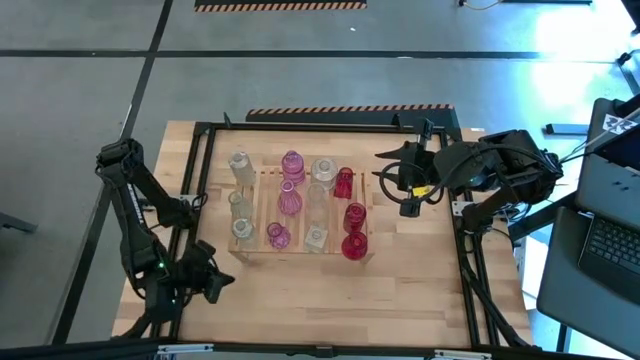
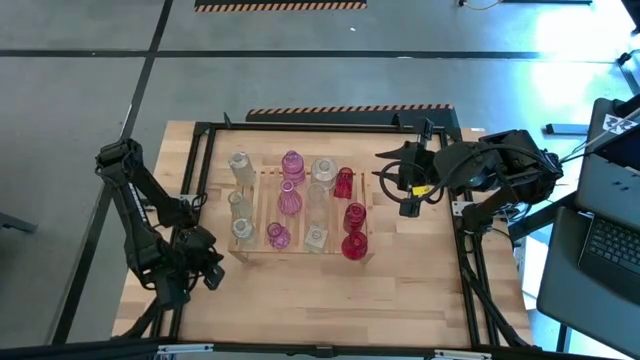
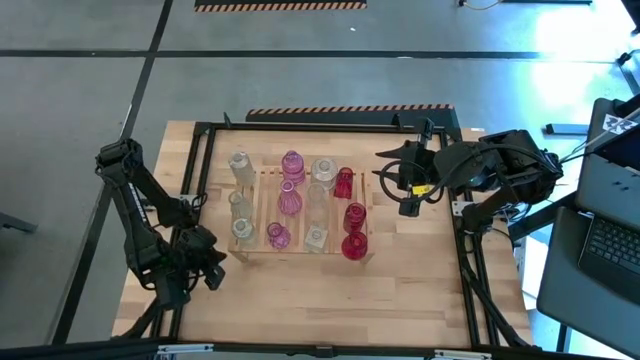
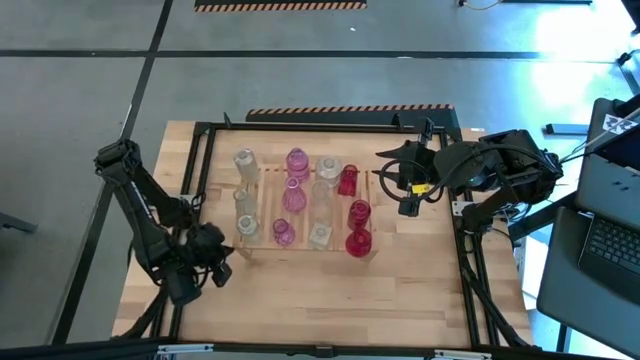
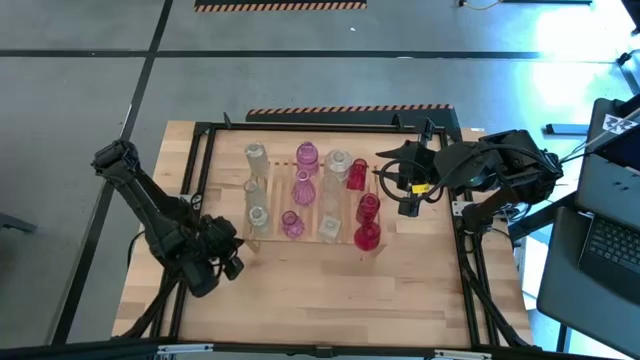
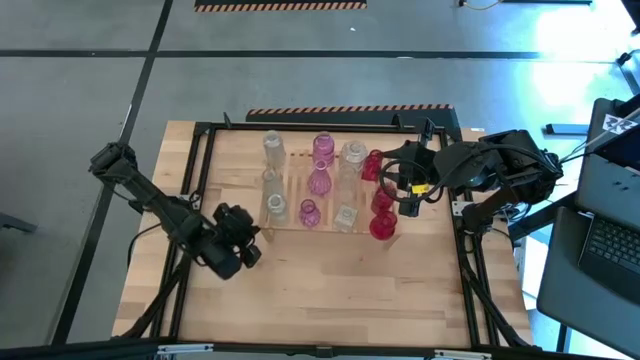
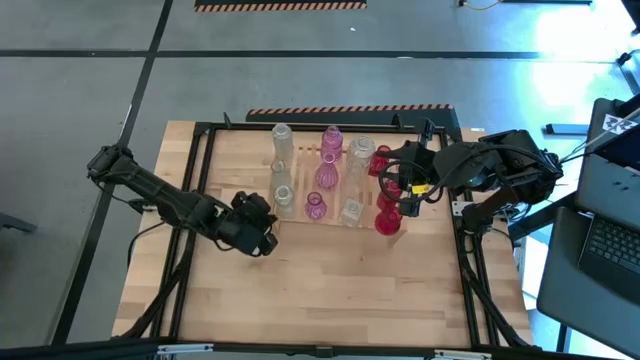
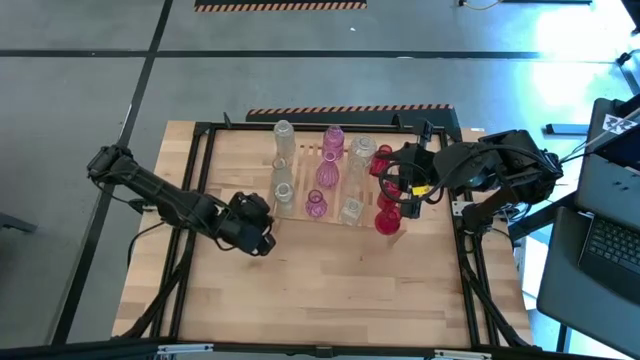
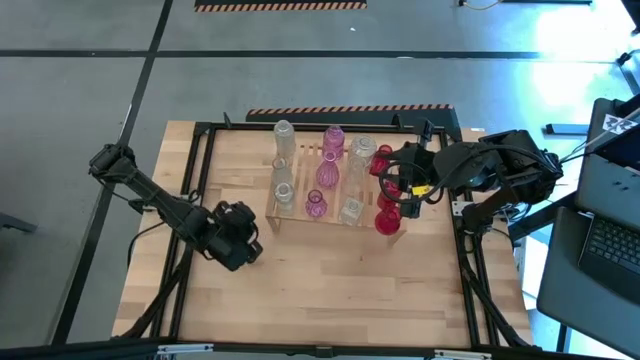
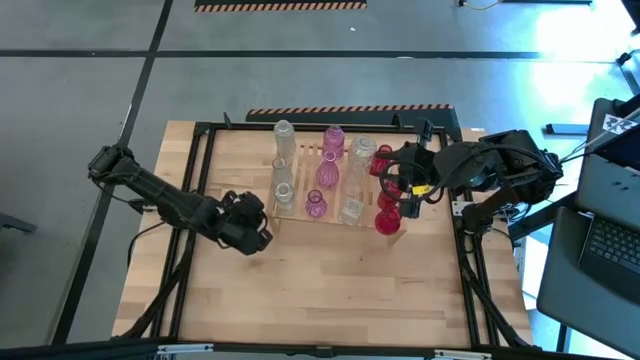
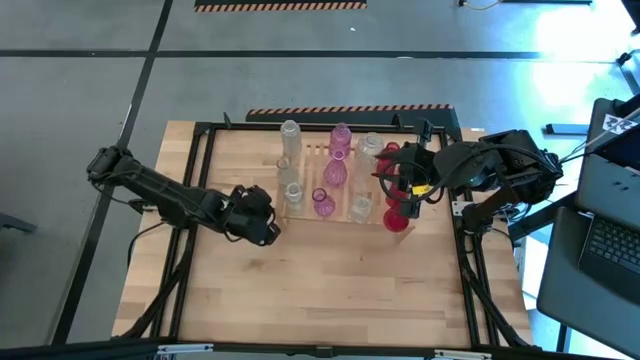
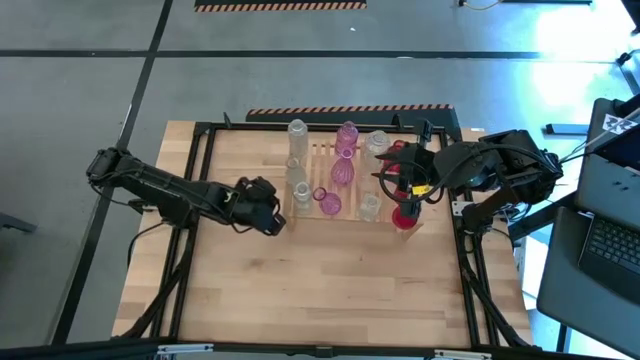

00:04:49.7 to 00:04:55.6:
Task: sort vases onto shelf
Move the shelf to the top right of the table

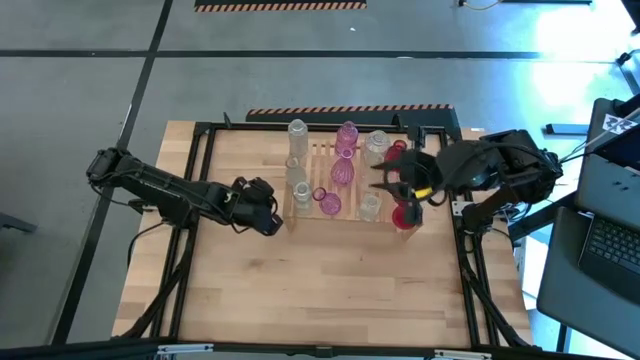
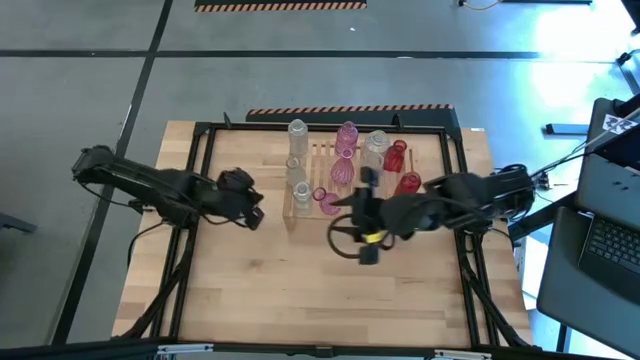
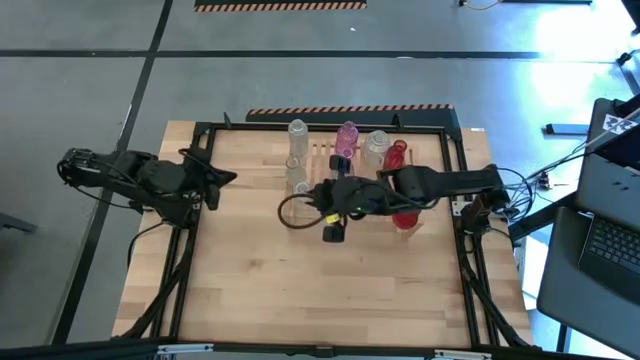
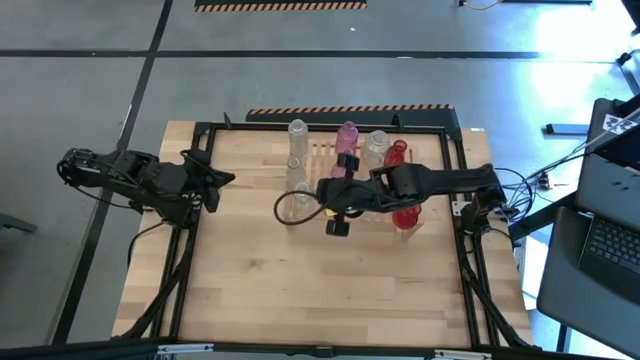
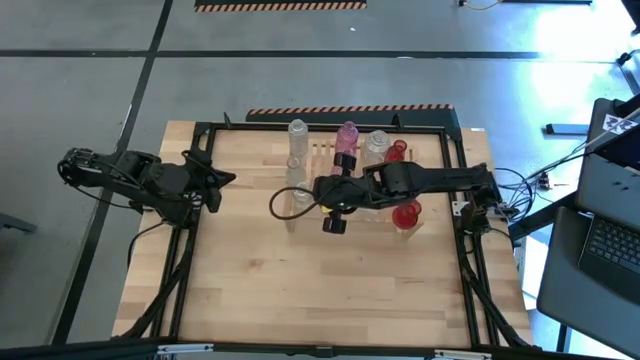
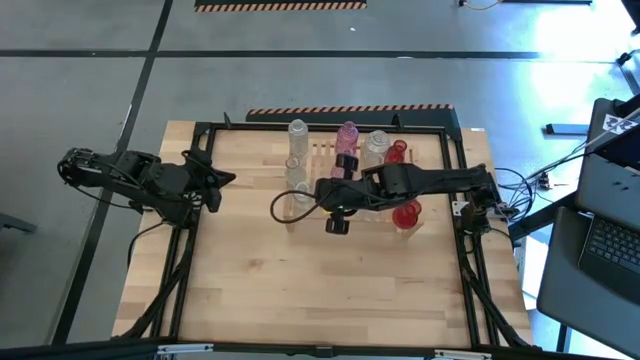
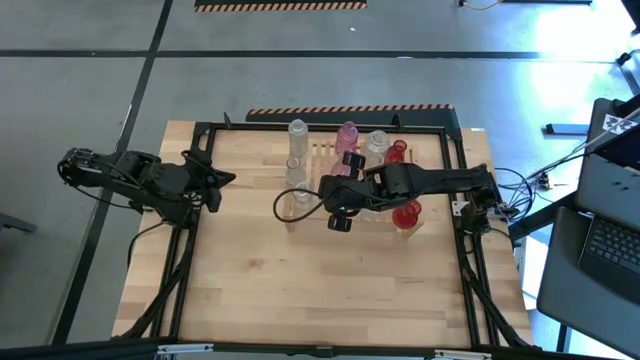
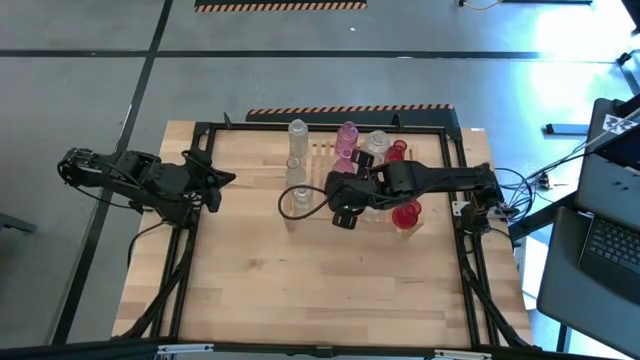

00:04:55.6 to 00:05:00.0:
Adjust the pink vase on the shelf

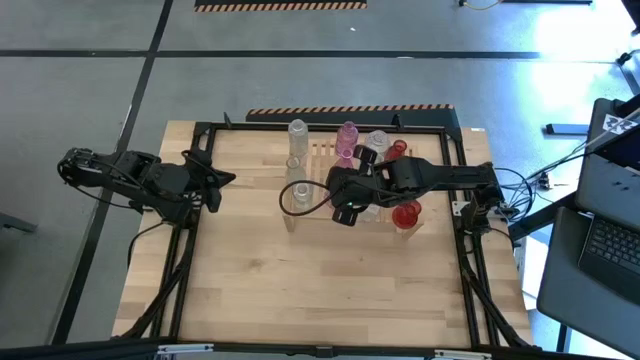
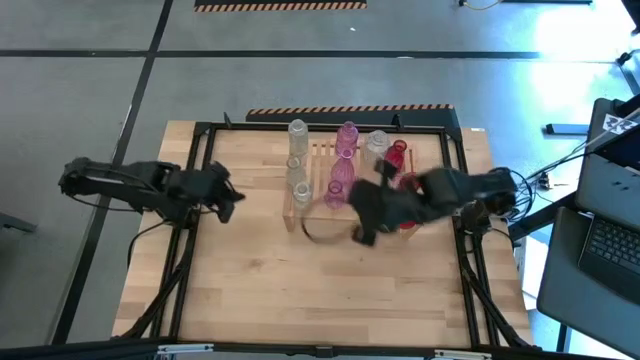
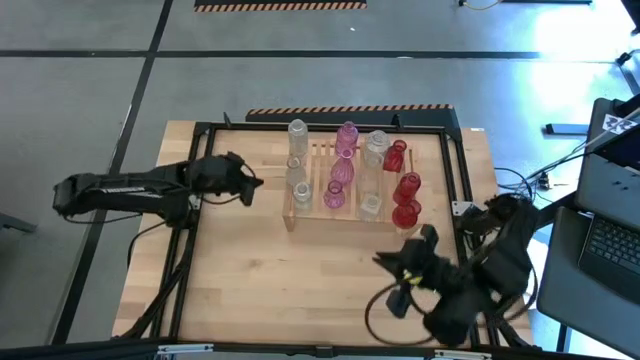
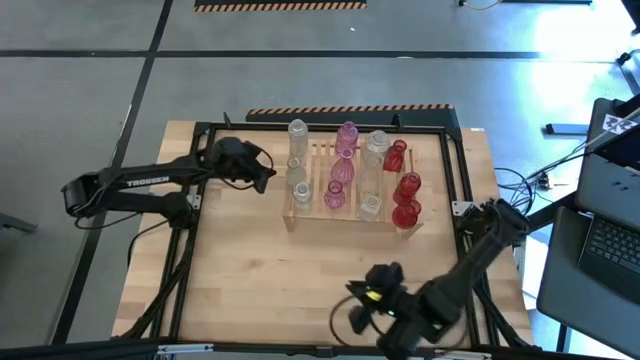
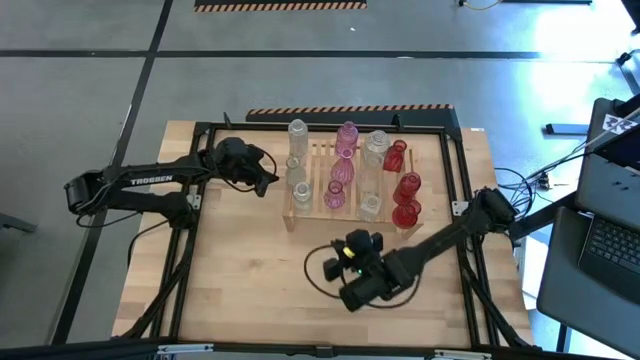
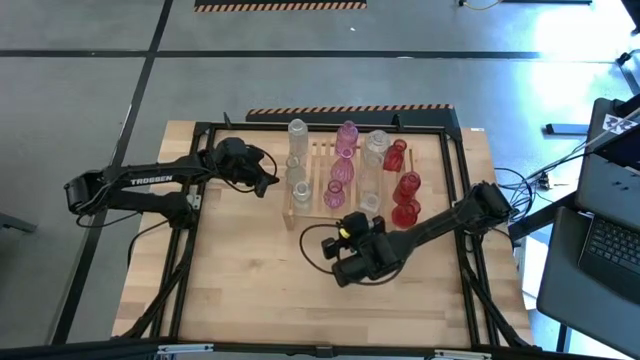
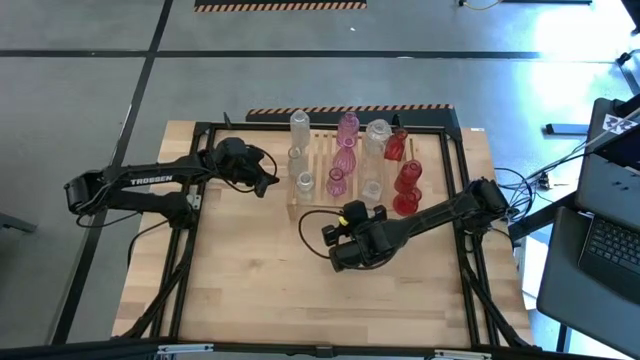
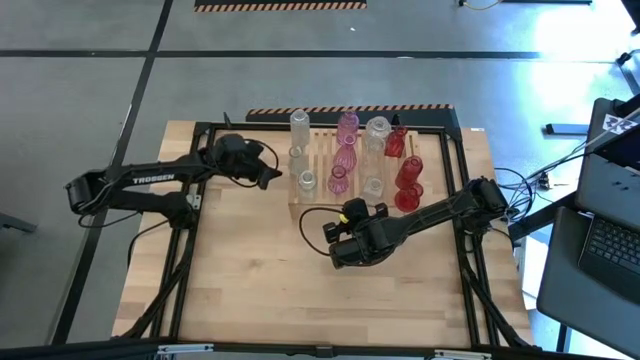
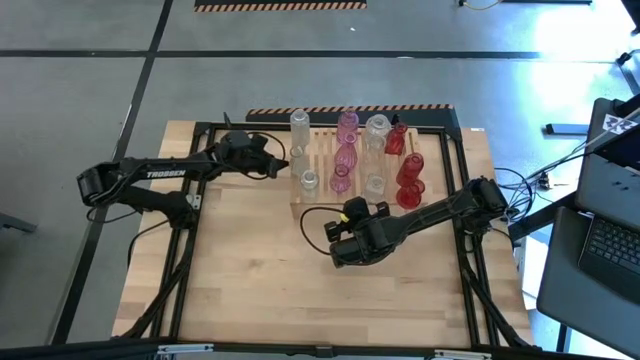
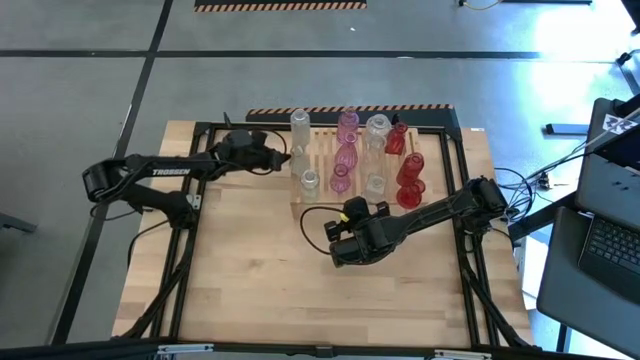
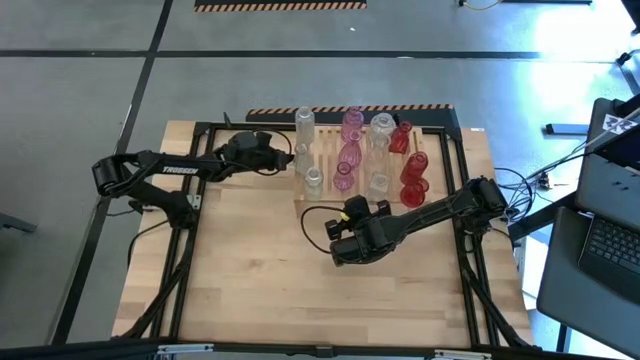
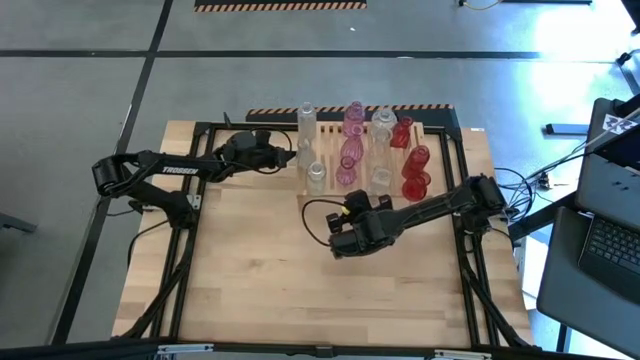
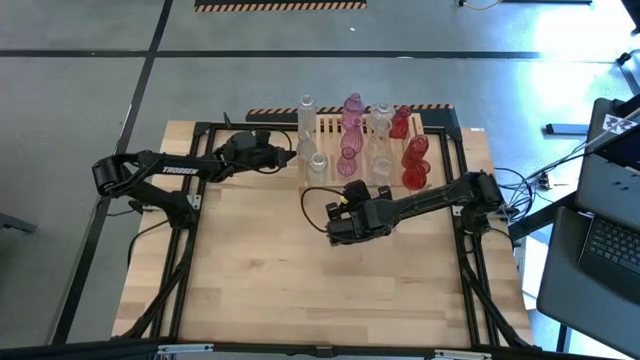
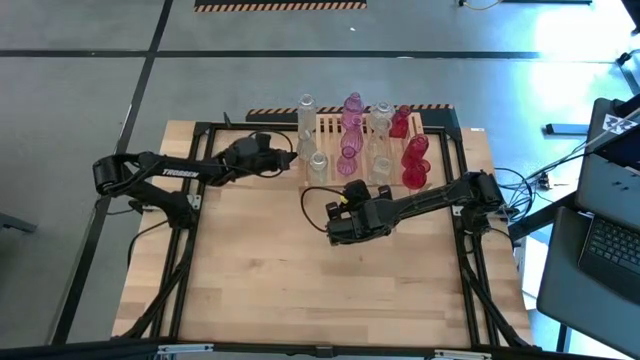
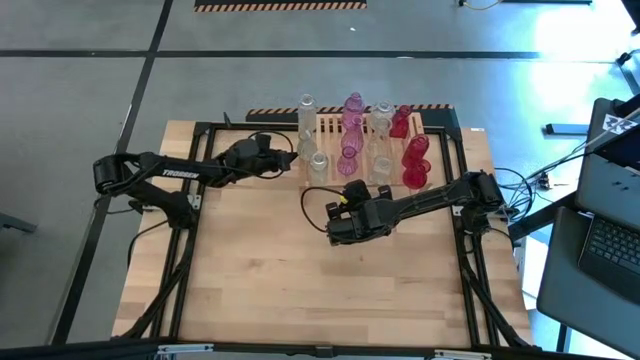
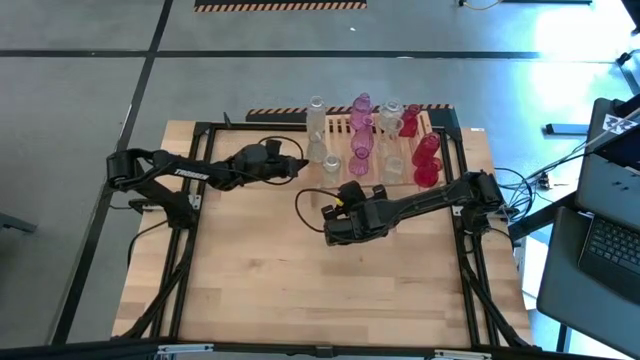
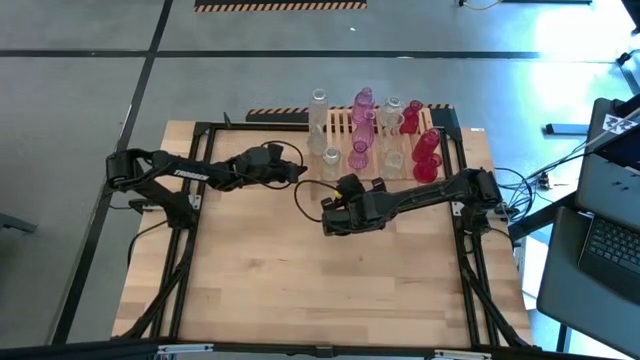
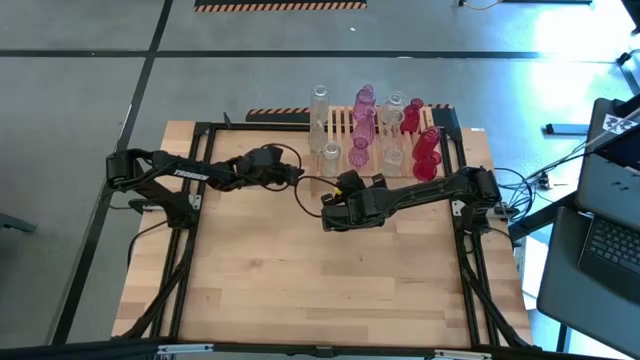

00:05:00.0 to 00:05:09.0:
Adjust the shelf on the top right of the table

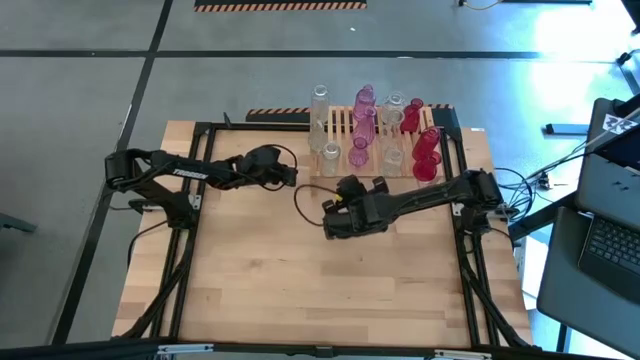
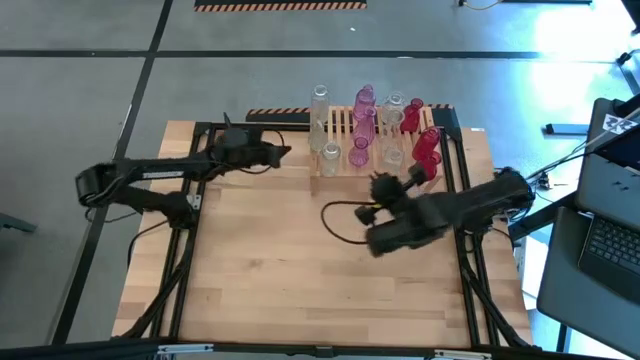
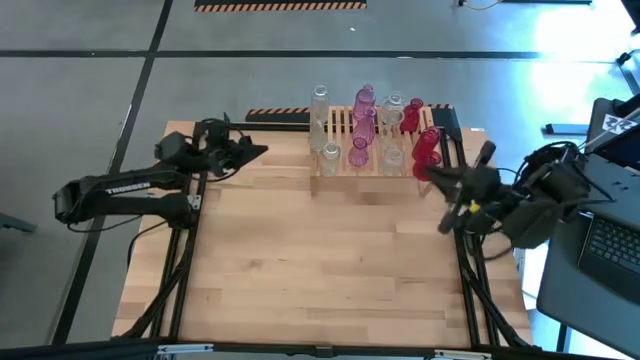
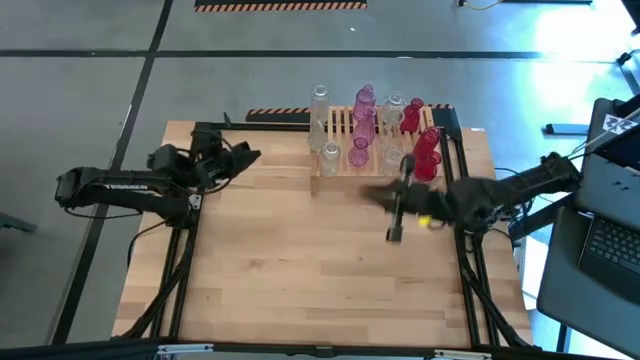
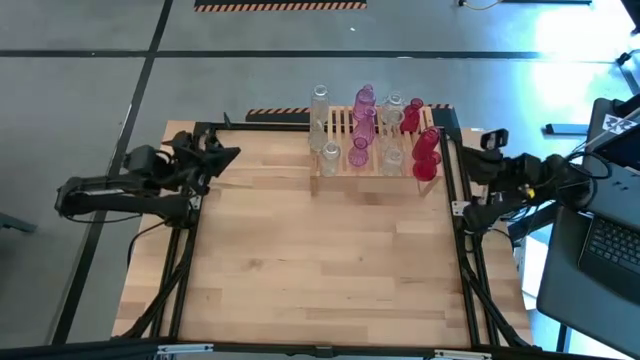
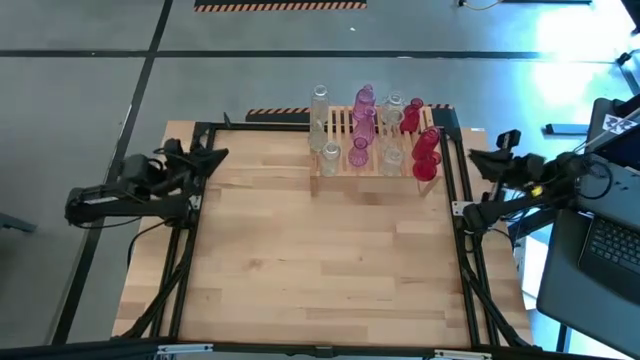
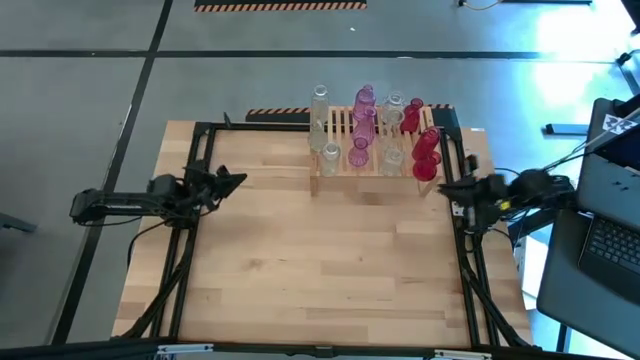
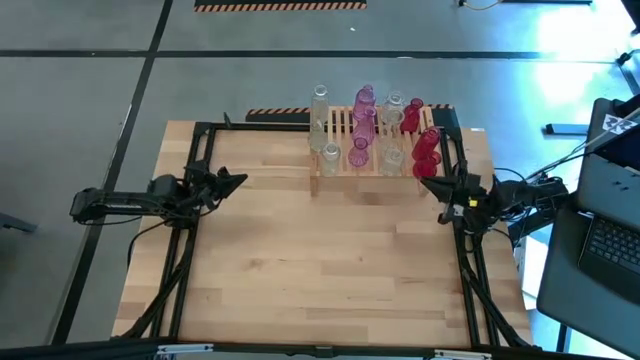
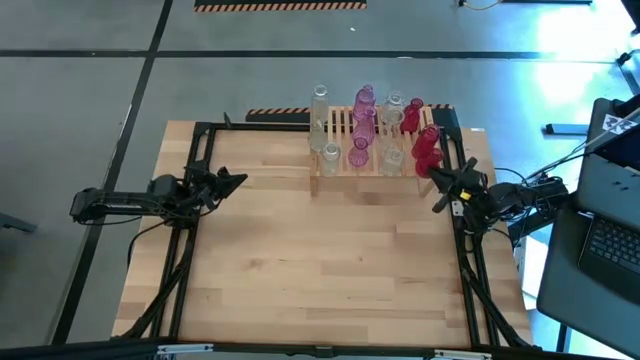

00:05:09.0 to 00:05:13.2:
Adjust the red vase on the shelf
